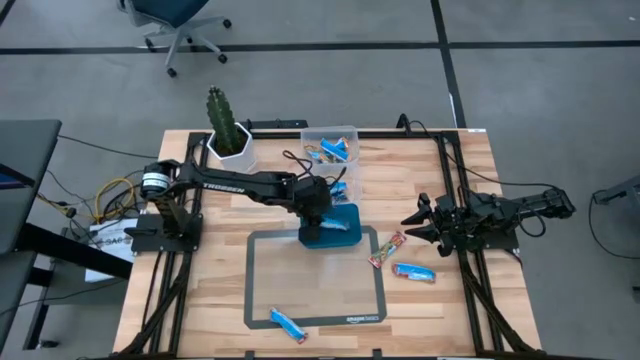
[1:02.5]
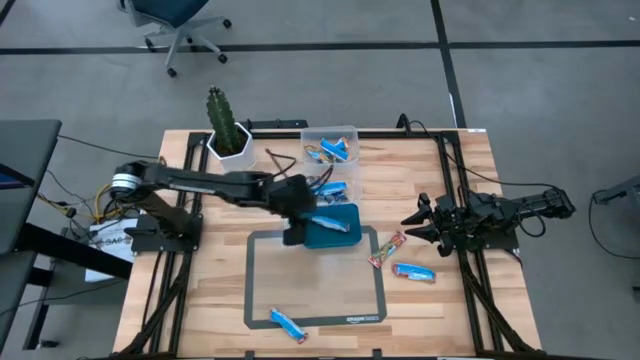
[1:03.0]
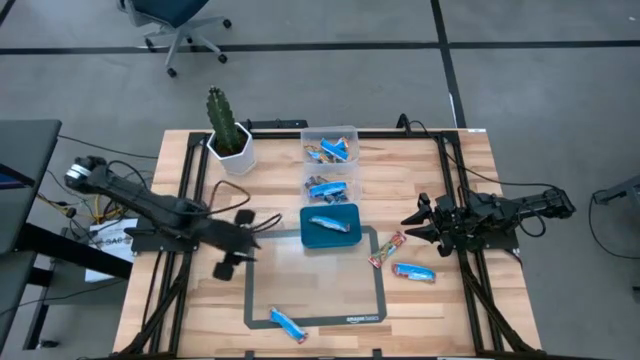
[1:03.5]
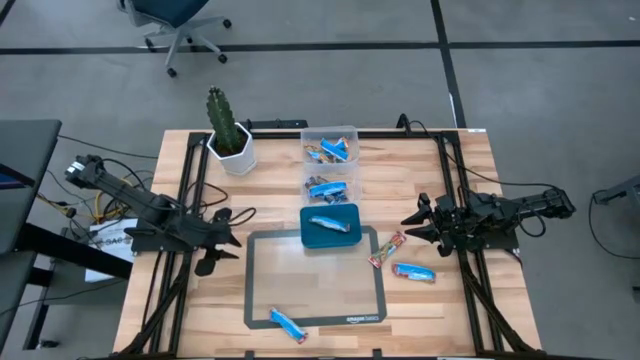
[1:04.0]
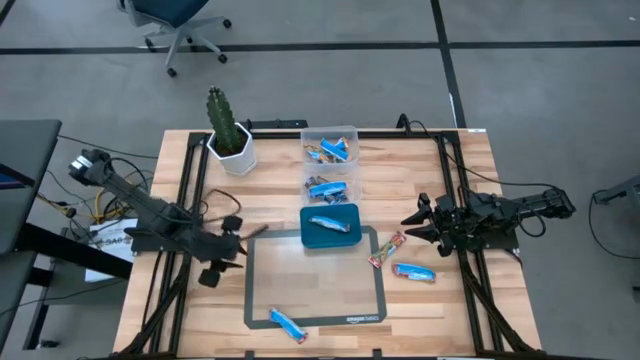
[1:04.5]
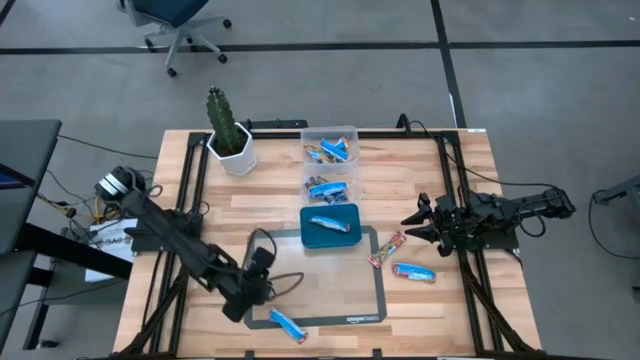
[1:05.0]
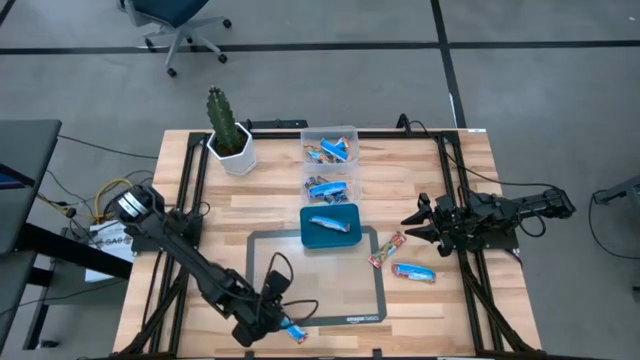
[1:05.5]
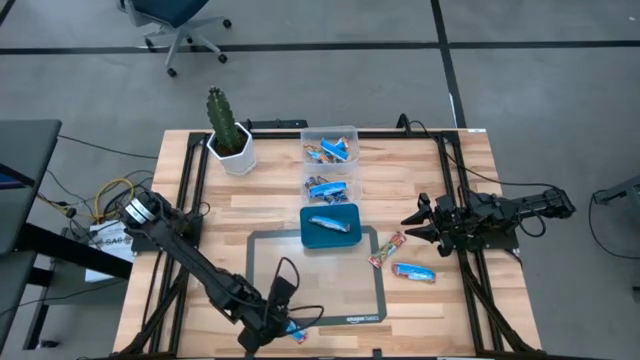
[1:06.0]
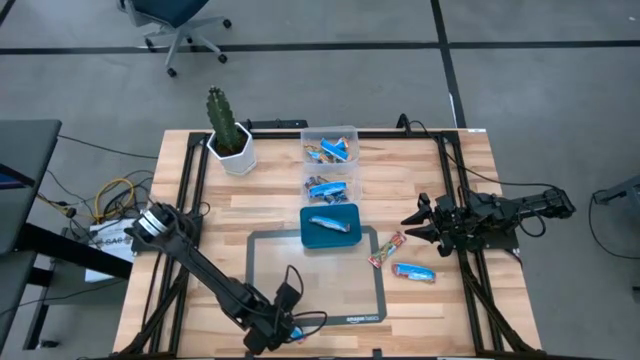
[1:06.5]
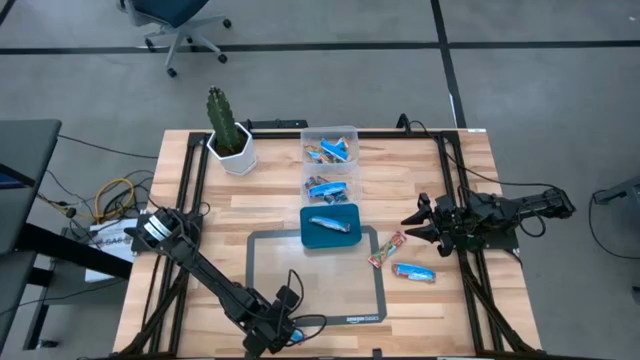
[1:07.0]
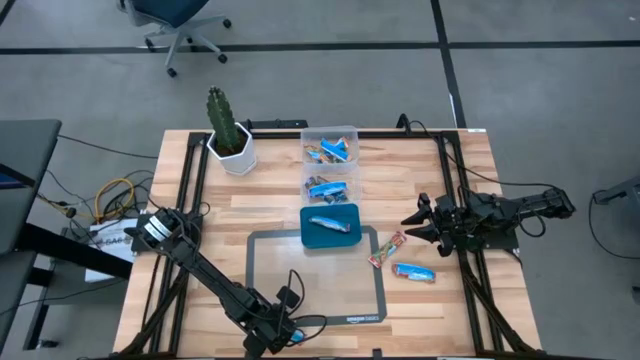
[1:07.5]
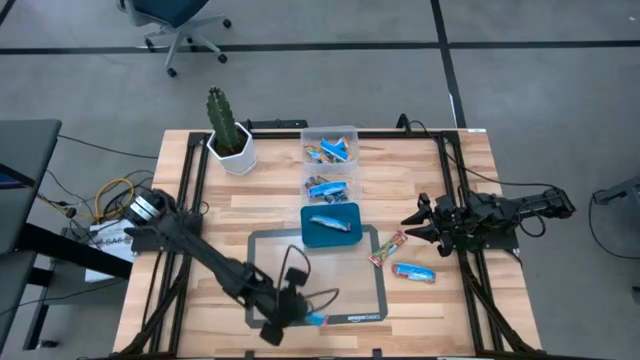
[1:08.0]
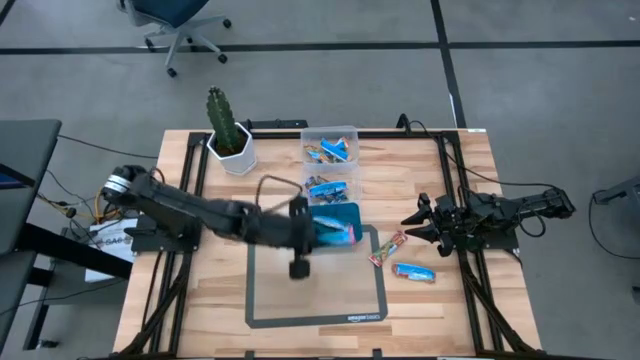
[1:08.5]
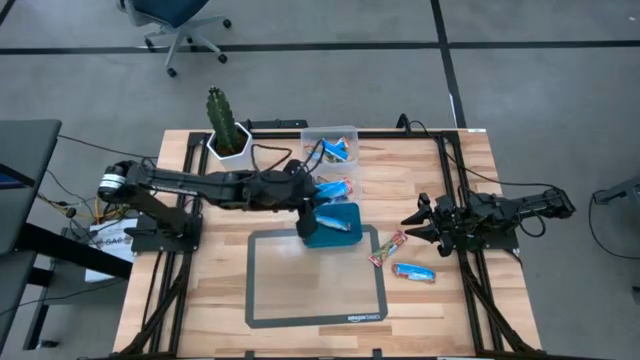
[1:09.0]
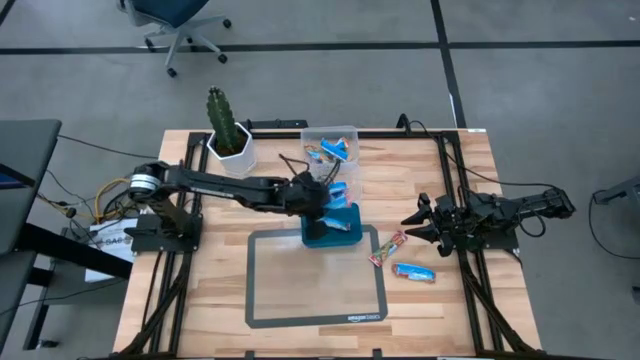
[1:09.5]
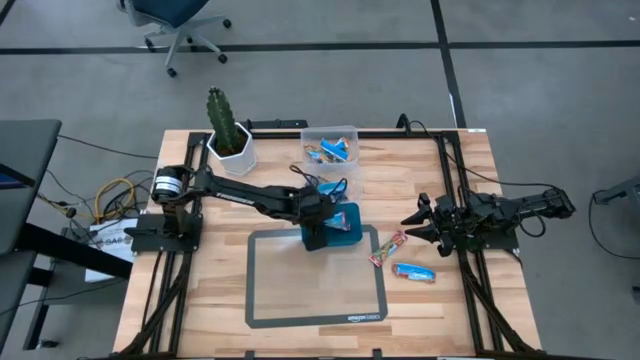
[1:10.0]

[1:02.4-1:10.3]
Task: Pick and place Granola Bars by type
Put the red granola bar into the blue bin

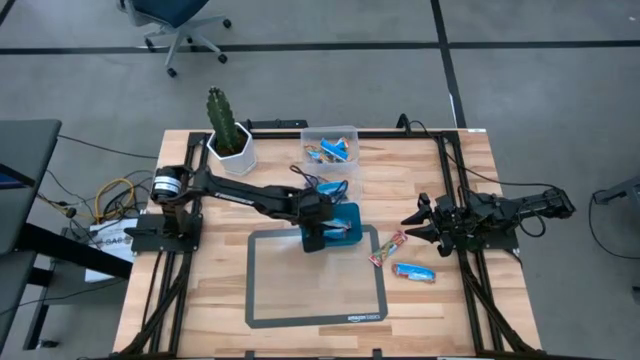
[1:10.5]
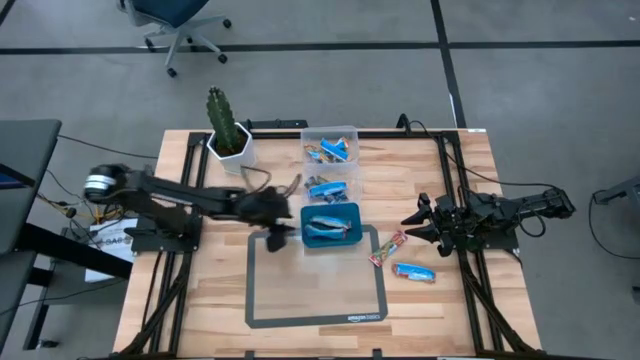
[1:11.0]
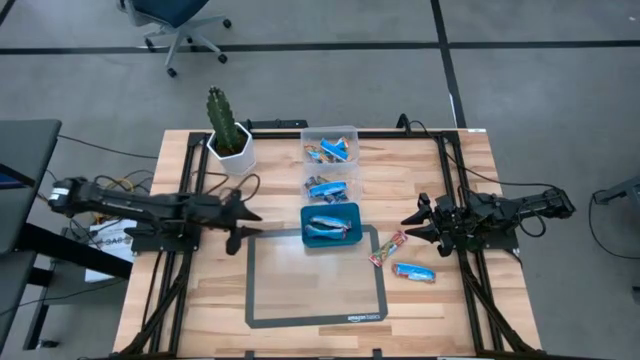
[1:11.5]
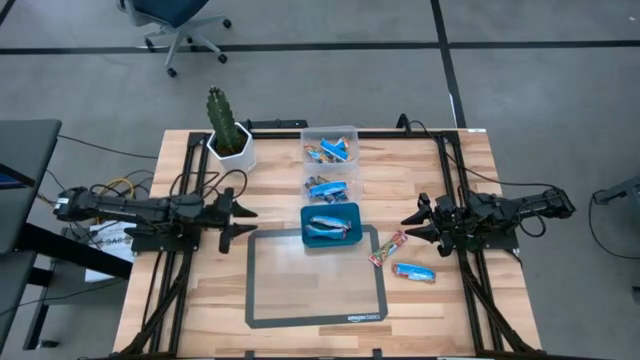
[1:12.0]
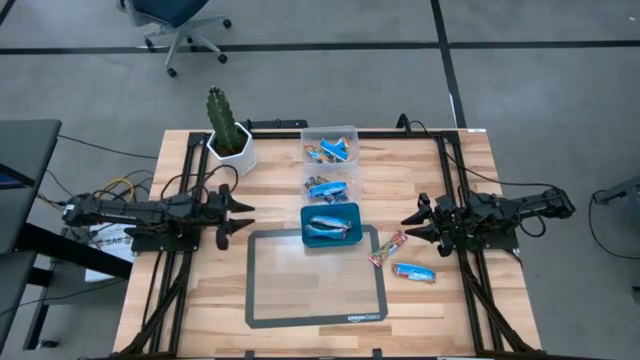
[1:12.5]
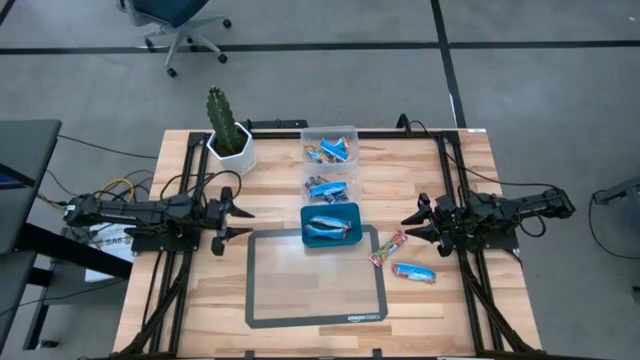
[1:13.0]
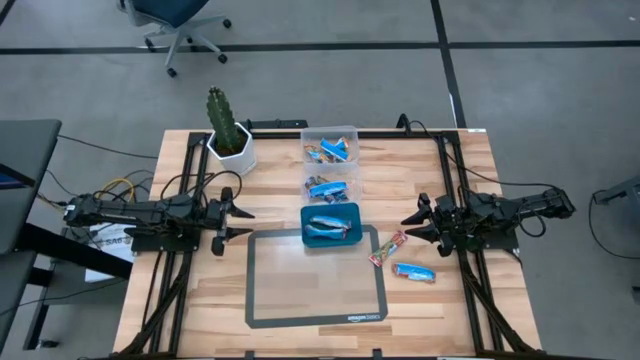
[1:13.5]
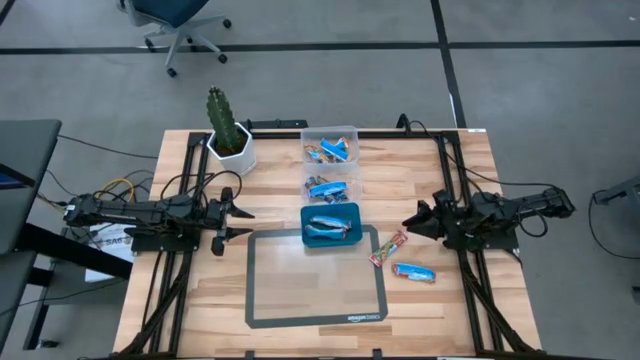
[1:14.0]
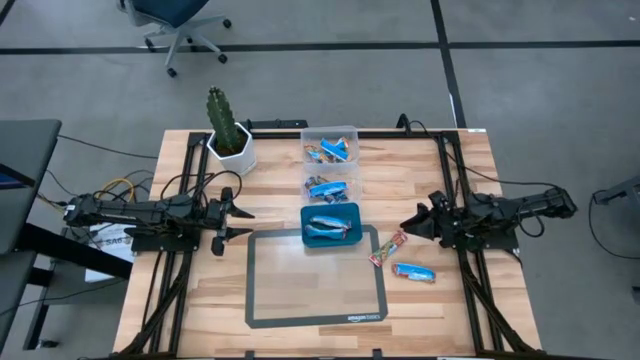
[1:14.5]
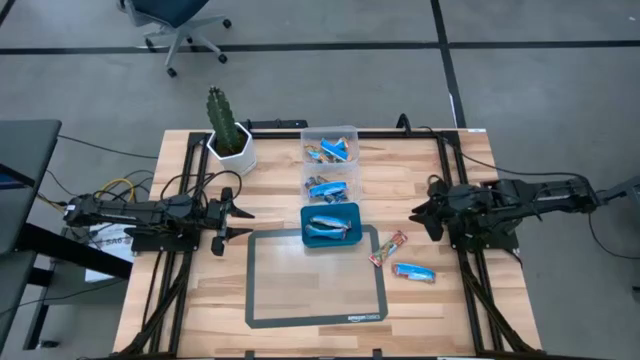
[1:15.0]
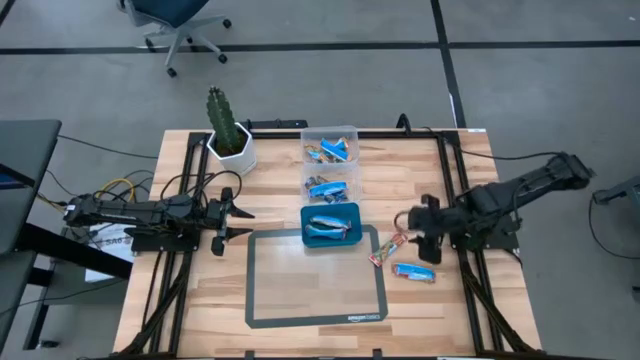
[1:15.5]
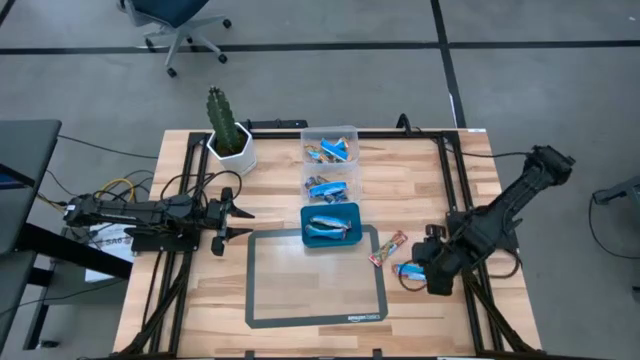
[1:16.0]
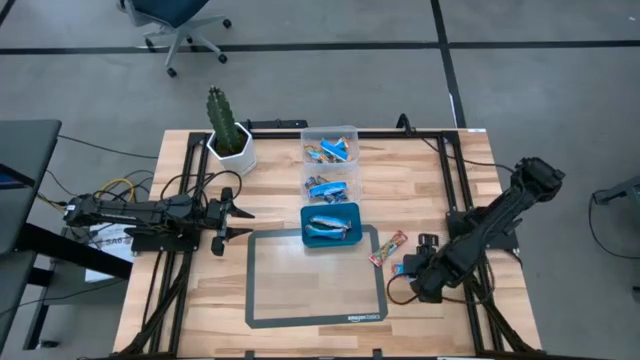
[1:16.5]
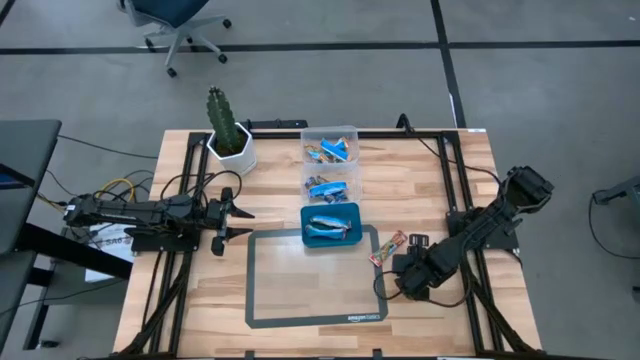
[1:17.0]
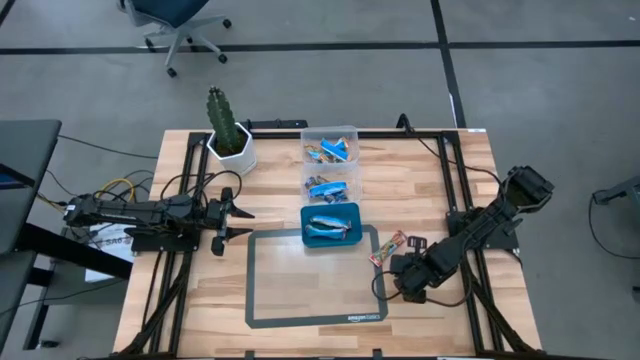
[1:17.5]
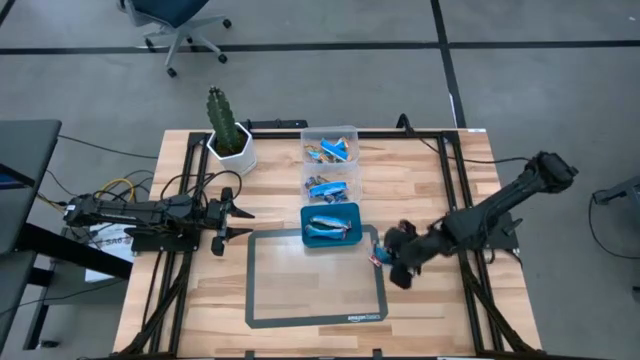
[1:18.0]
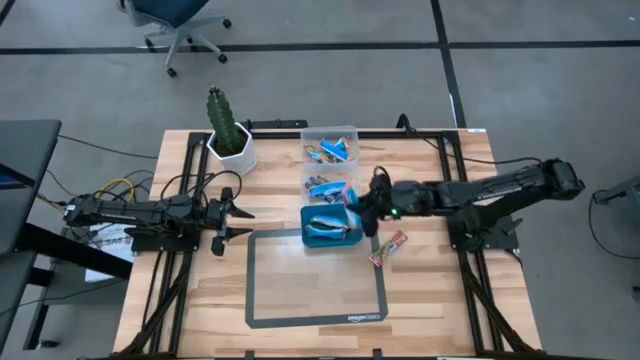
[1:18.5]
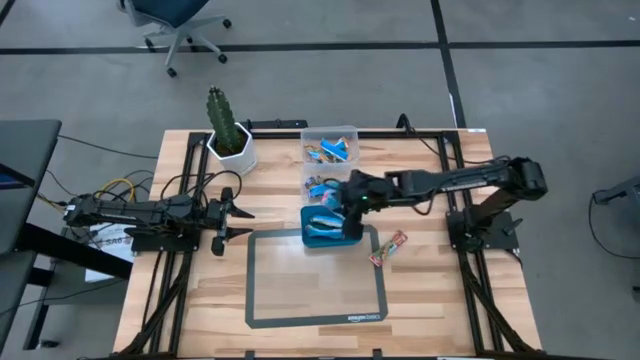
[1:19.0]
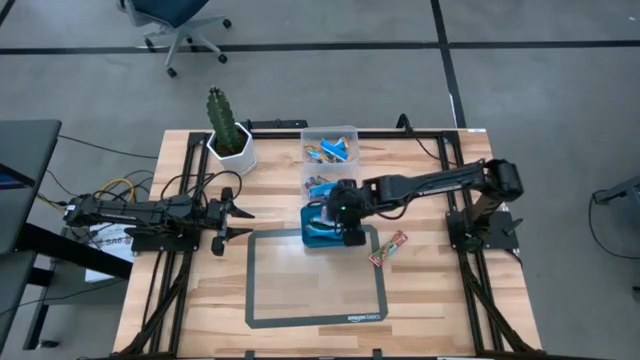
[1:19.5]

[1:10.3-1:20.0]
Put the red granola bar into the blue bin

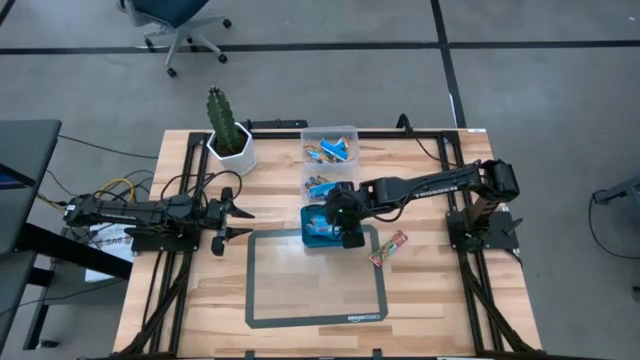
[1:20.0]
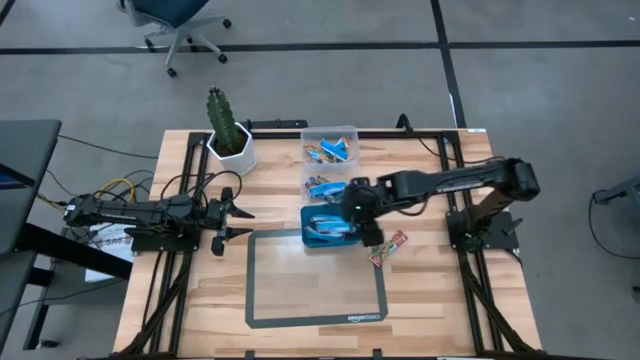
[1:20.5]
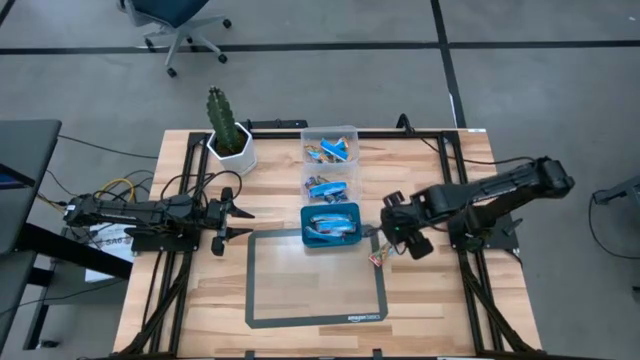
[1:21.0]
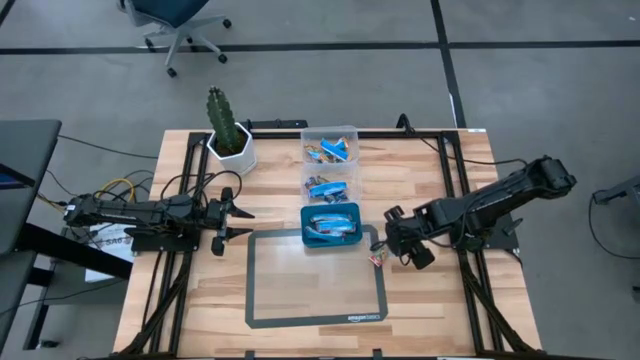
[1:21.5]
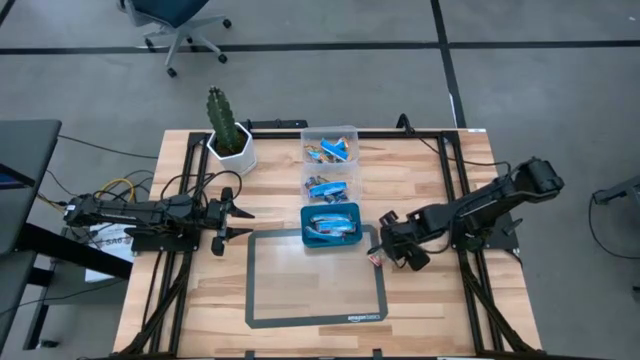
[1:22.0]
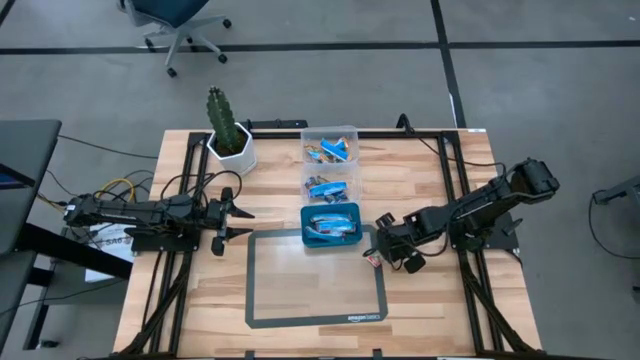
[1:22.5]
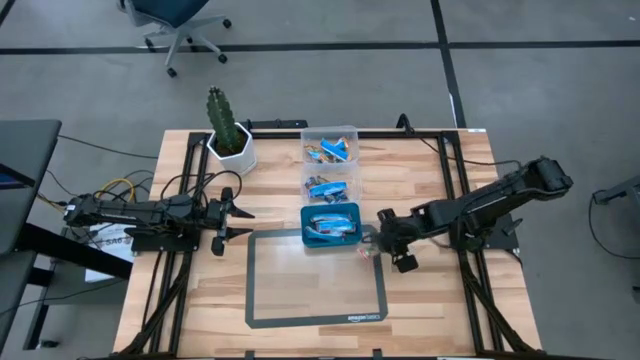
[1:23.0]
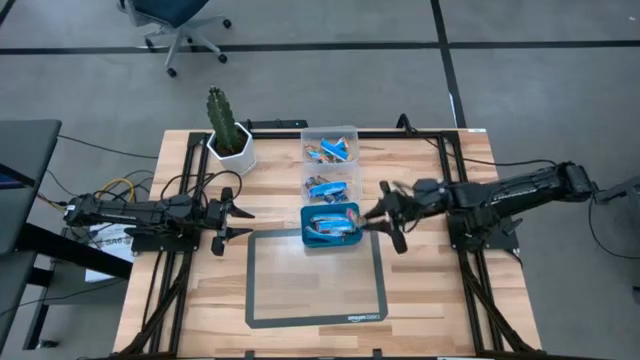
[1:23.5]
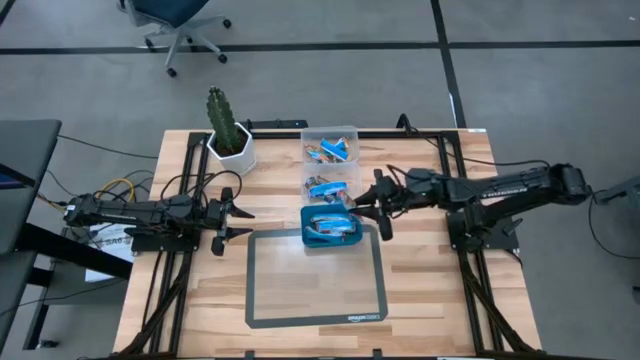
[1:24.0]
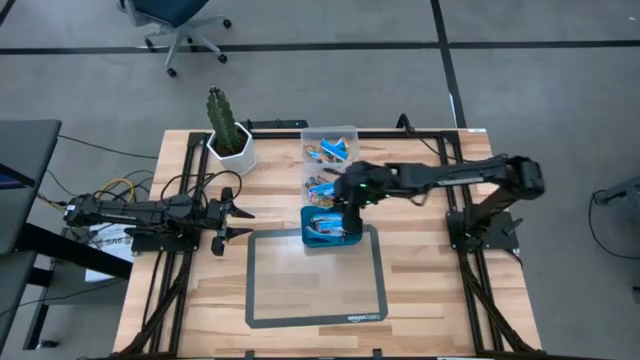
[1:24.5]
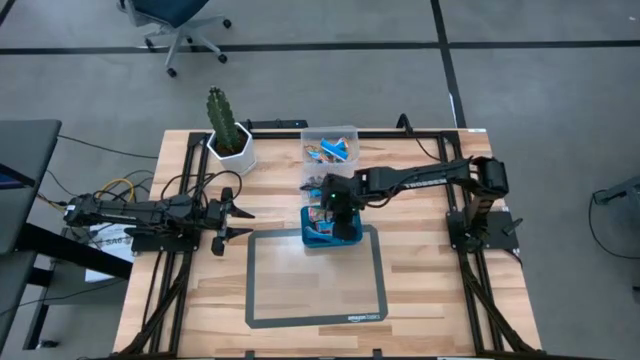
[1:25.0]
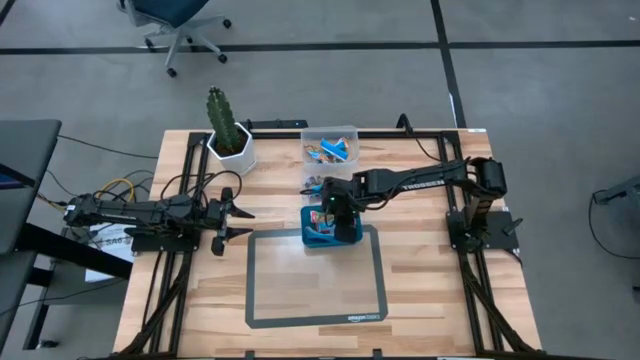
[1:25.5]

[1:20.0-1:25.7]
Put the red granola bar into the blue bin
